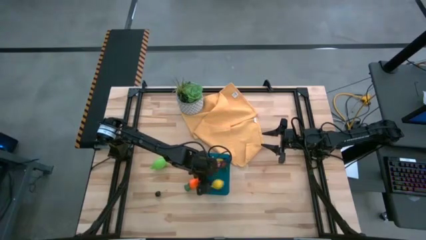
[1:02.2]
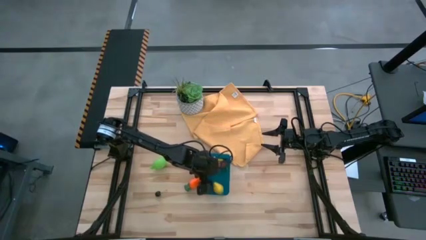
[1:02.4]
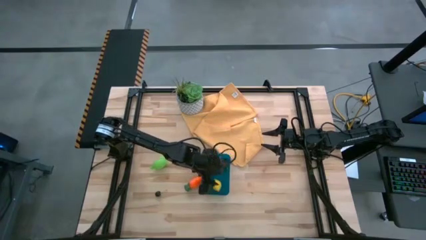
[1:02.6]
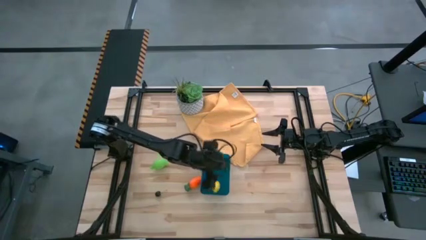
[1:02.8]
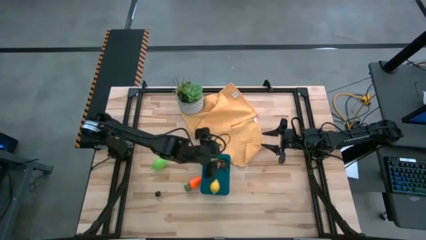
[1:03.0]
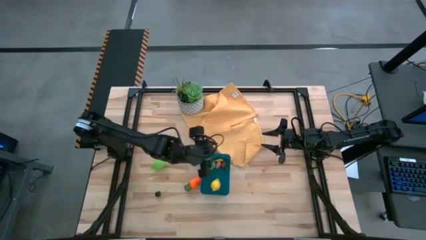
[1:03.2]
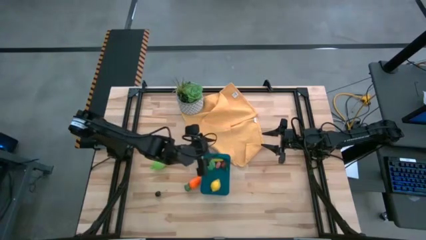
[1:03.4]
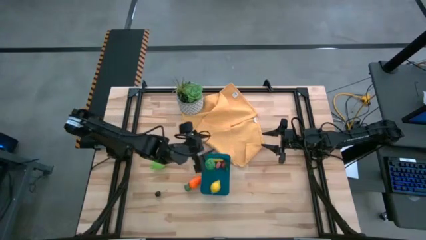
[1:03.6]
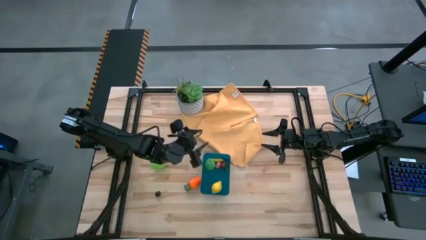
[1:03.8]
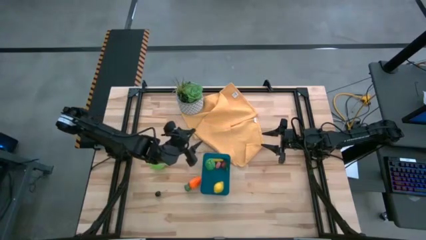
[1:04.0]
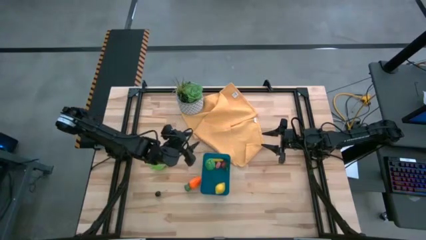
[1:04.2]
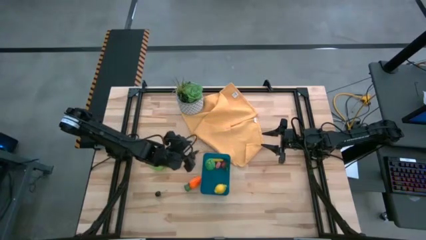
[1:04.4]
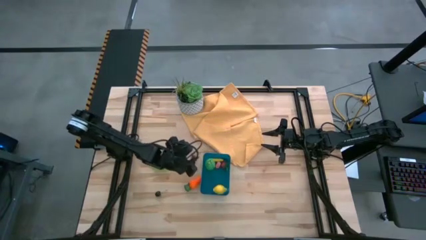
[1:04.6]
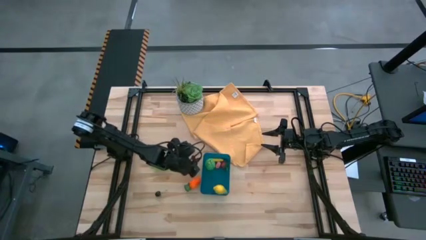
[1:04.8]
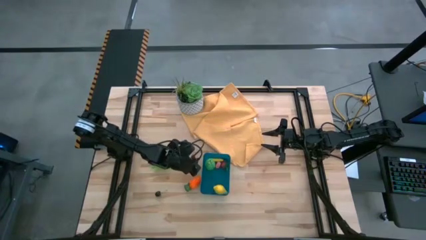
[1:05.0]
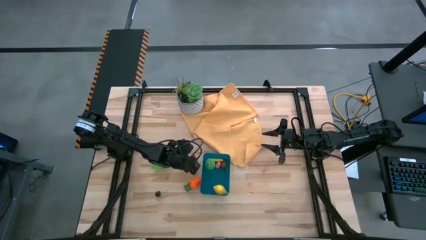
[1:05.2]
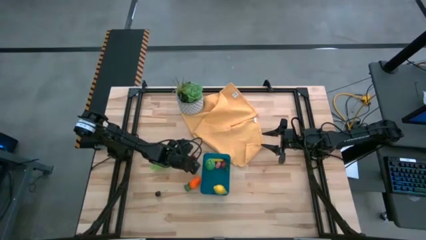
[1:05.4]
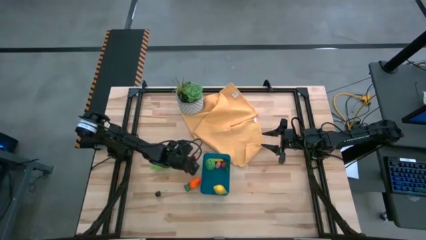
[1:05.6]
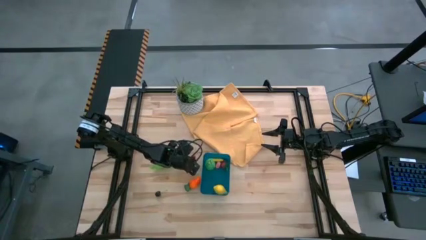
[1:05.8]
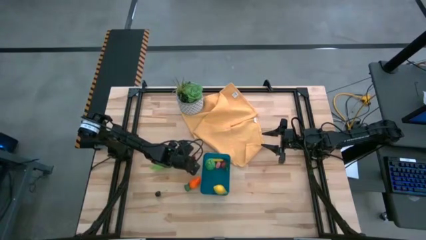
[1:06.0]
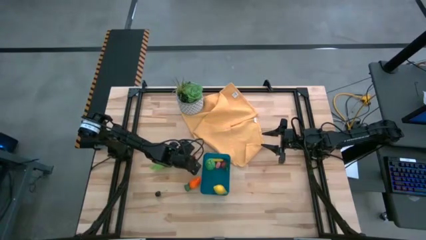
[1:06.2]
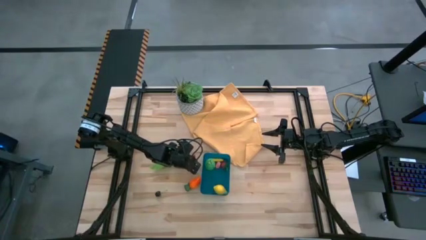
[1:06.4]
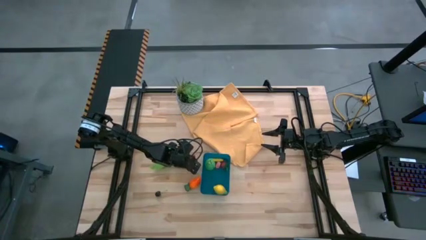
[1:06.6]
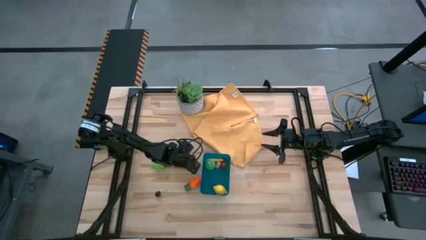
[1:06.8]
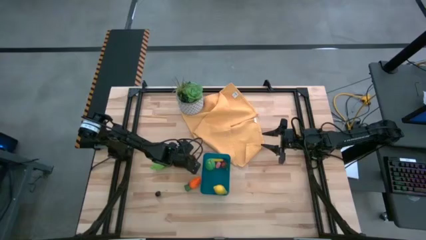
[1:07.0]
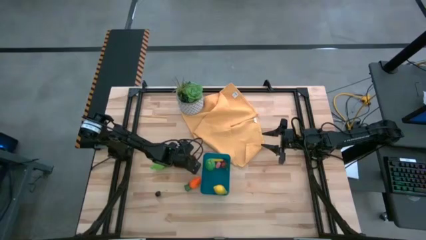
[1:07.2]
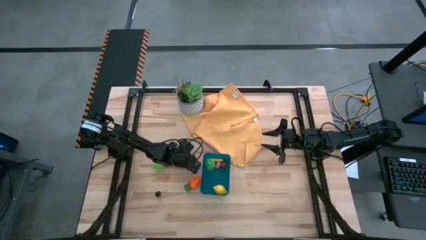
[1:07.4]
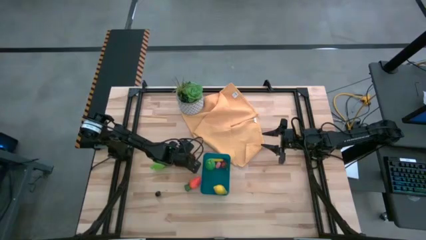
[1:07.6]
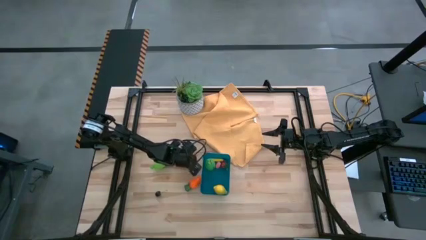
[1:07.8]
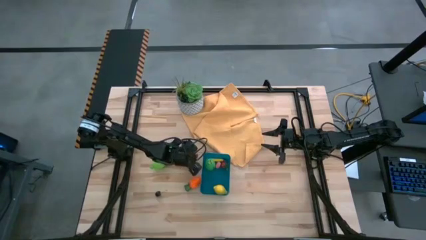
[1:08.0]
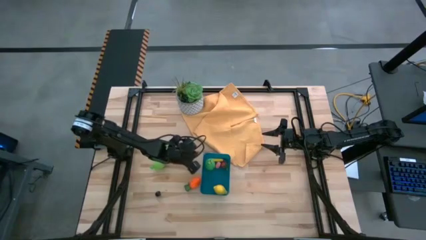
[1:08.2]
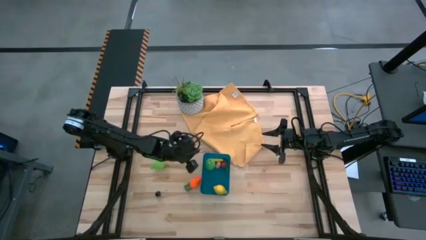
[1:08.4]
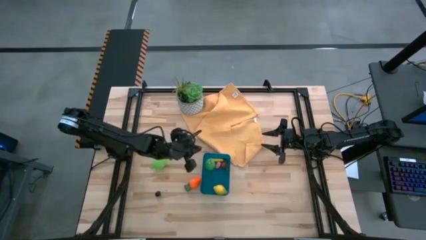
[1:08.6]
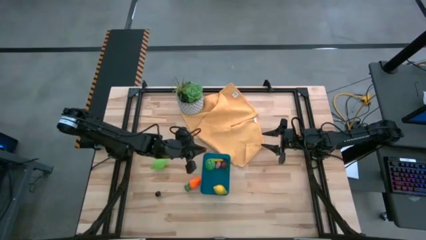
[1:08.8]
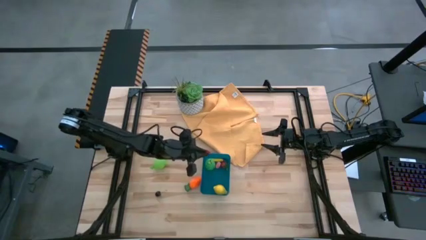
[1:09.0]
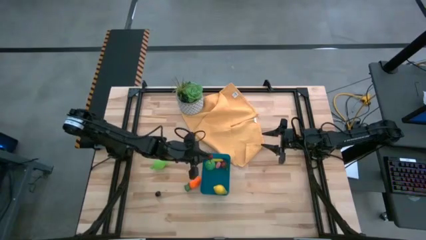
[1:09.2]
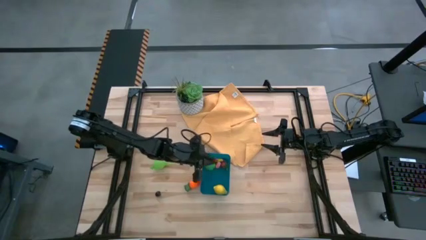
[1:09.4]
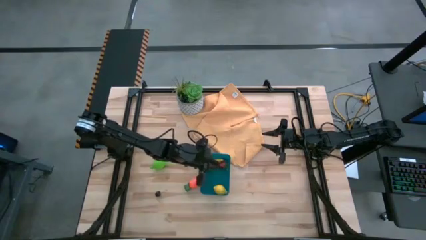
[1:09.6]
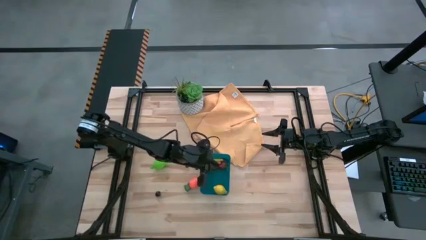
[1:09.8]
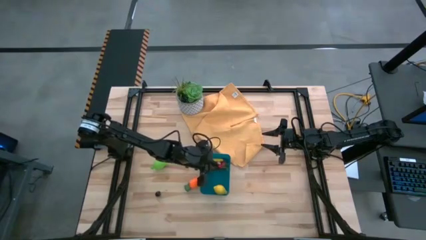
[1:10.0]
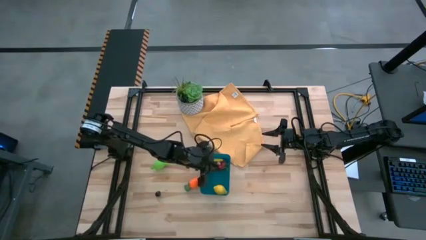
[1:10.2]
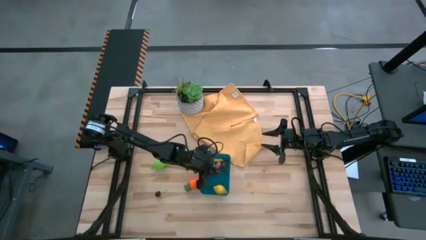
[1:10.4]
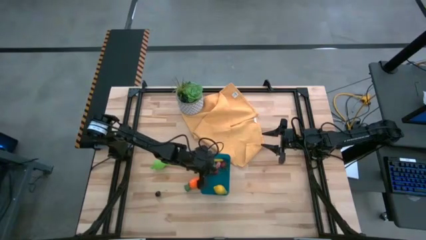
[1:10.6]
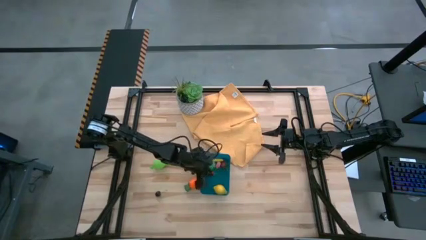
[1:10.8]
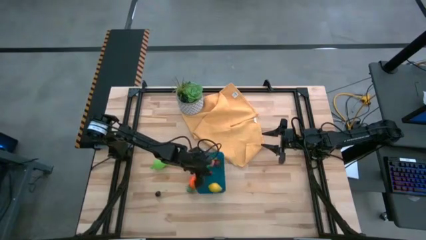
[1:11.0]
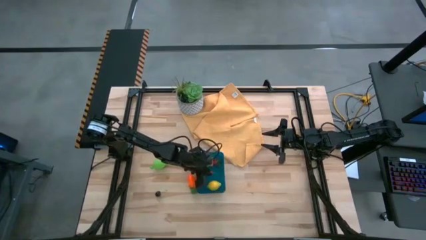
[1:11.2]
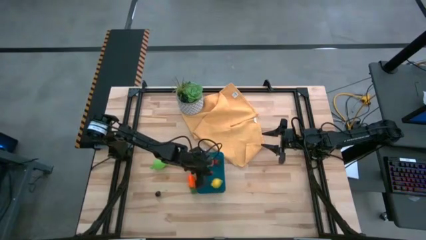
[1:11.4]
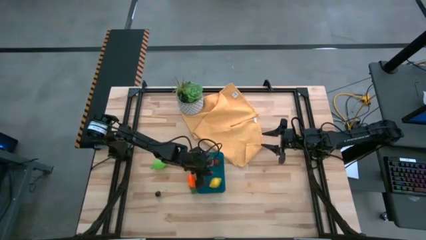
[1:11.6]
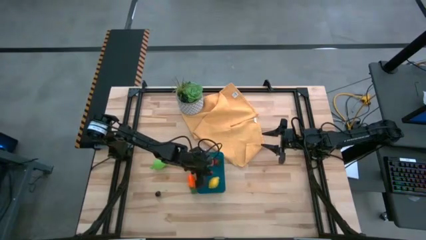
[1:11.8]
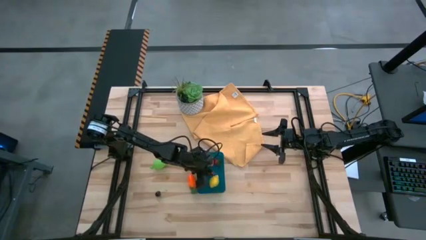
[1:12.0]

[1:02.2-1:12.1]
Task: Pick and placing Produce into tupperware
Put the red cherry into the bin

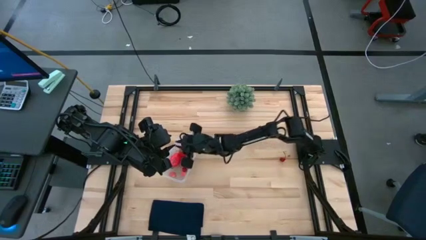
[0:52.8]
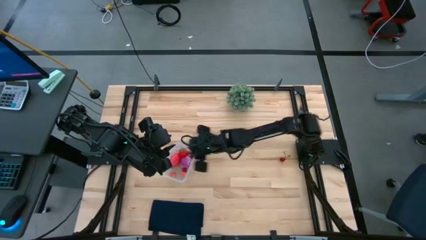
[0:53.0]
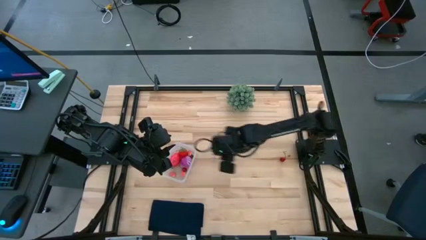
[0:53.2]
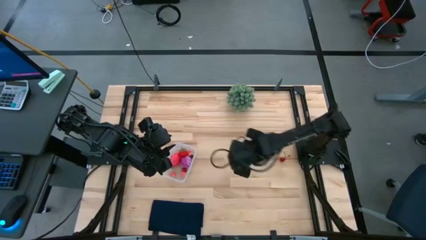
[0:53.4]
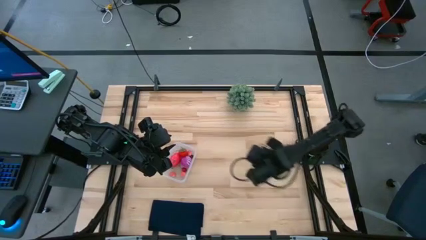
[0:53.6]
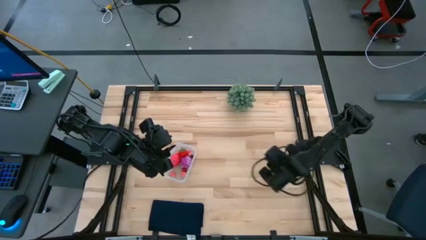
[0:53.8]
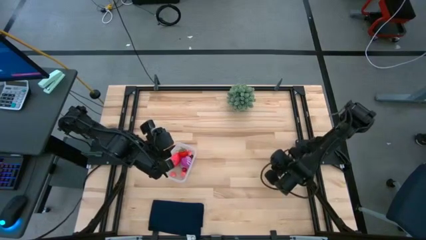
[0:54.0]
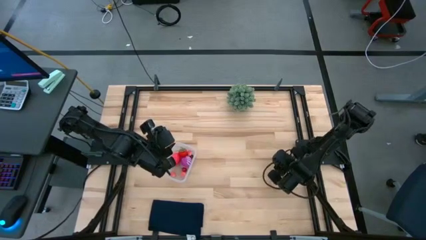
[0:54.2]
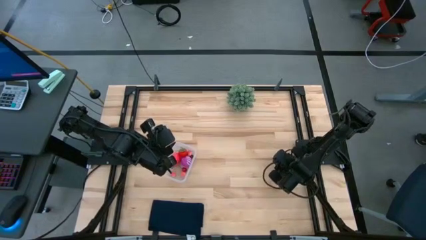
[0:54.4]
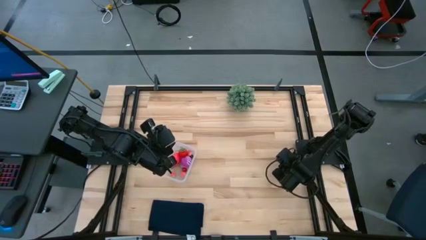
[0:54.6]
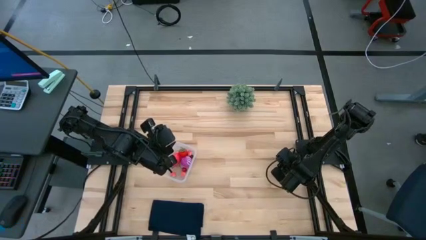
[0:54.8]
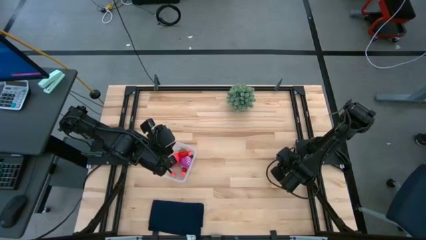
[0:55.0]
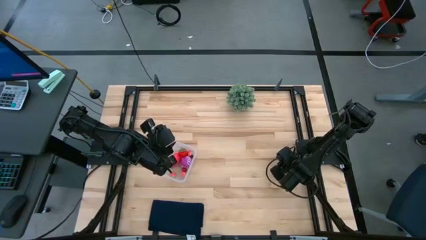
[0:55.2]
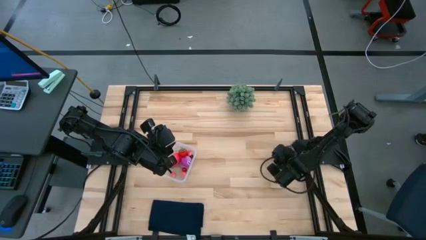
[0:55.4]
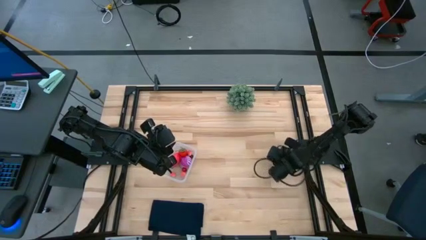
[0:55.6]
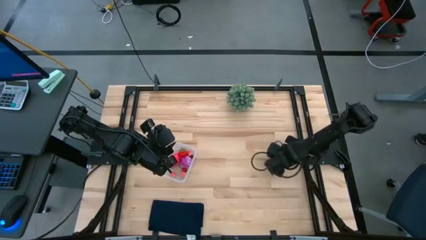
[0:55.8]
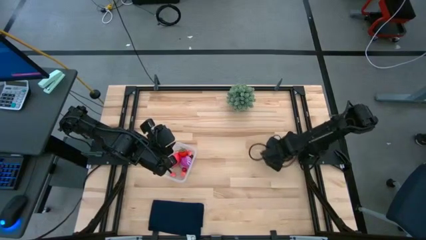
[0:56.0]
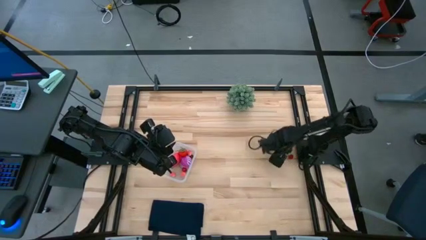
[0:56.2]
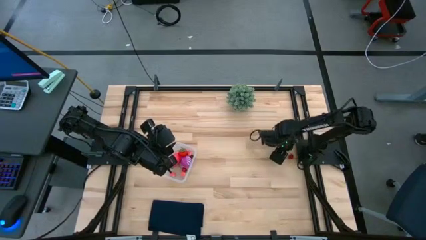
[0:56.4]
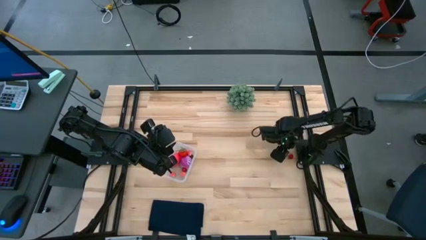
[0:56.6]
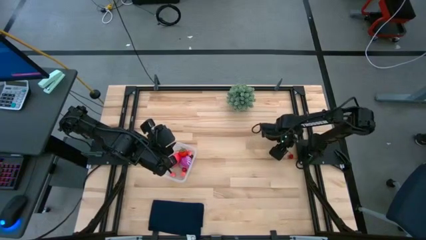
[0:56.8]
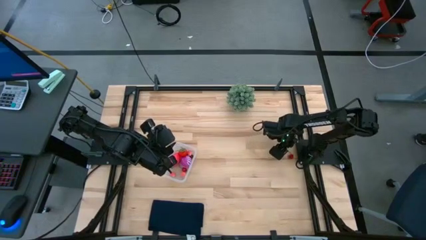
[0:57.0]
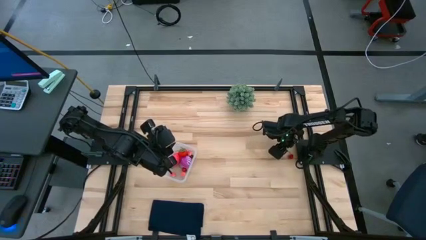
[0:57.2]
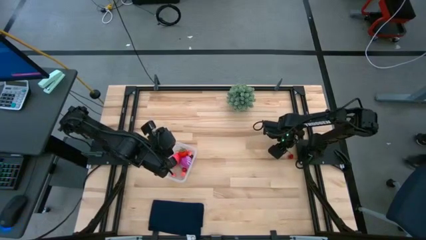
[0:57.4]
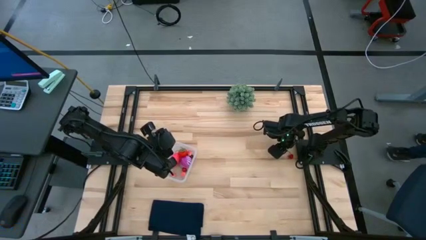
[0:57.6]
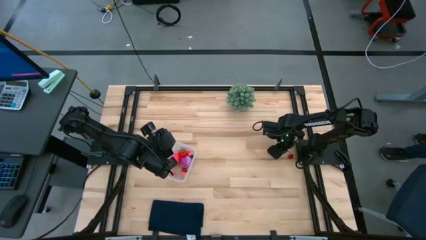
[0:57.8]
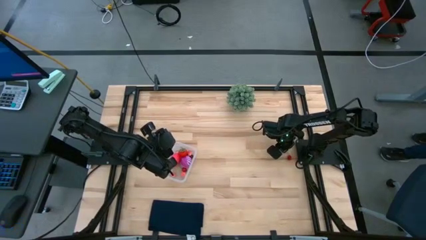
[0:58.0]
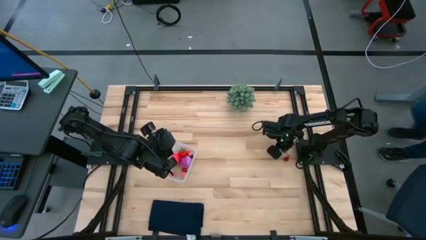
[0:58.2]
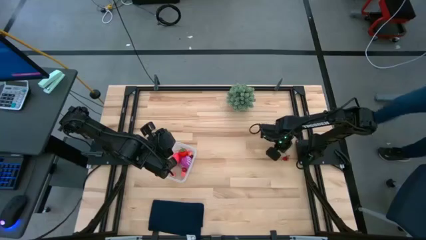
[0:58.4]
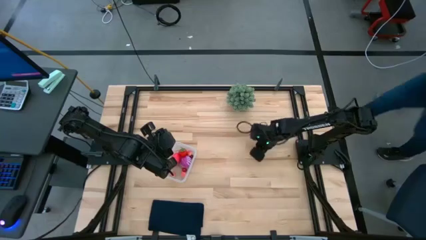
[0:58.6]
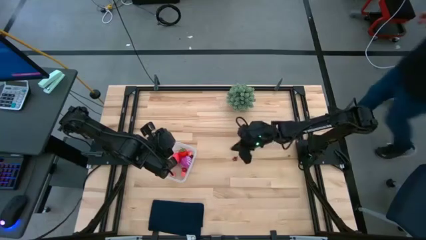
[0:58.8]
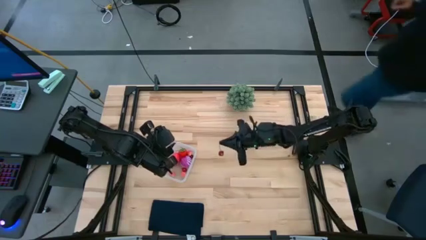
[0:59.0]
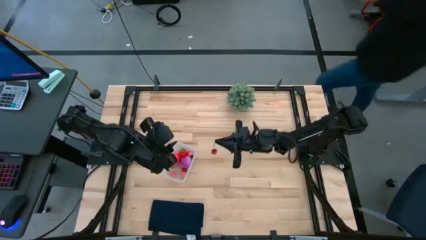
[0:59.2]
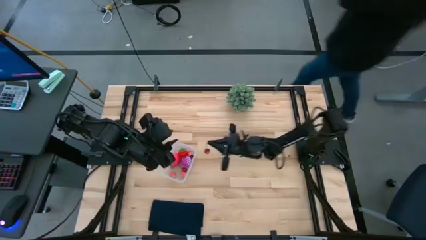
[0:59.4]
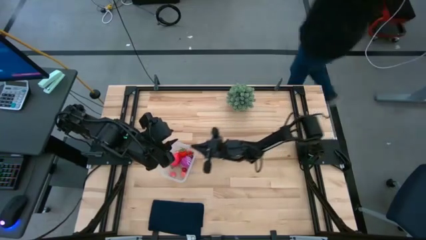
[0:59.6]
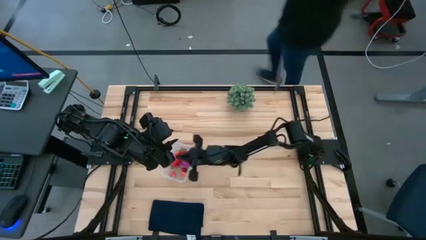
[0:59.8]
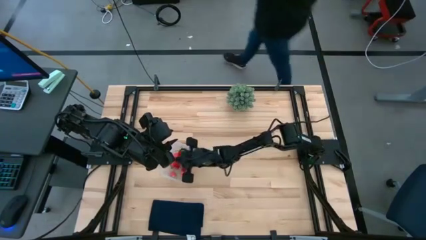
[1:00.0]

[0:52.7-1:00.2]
Task: Pick and placing Produce into tupperware
Put the red cherry into the transparent bin
